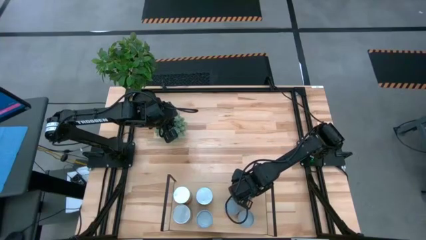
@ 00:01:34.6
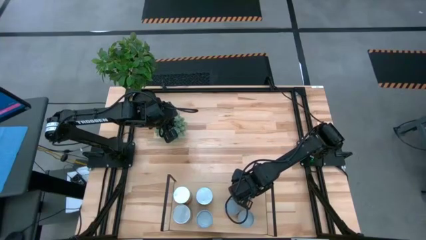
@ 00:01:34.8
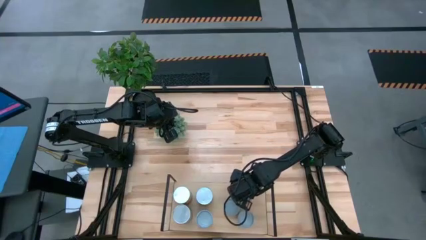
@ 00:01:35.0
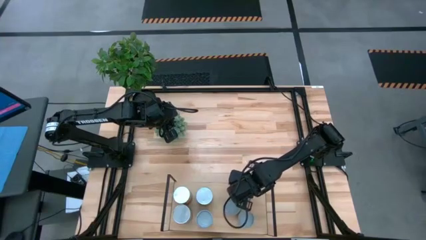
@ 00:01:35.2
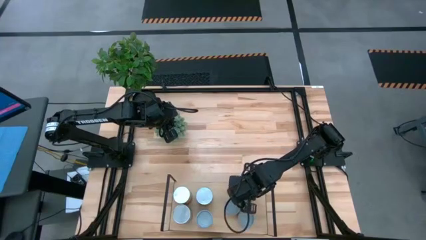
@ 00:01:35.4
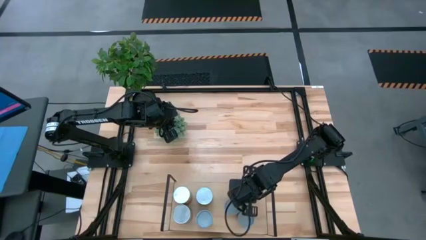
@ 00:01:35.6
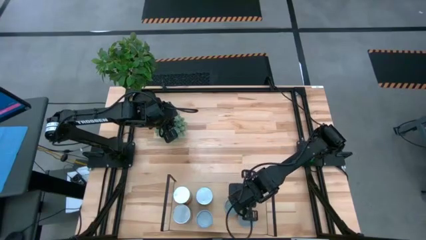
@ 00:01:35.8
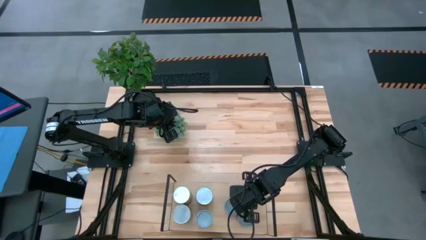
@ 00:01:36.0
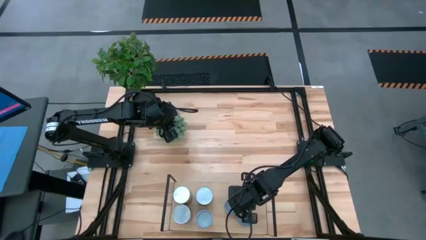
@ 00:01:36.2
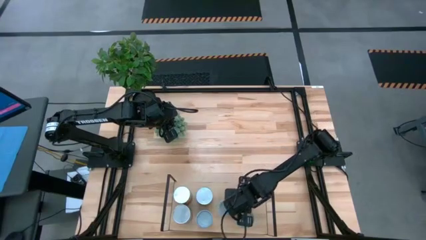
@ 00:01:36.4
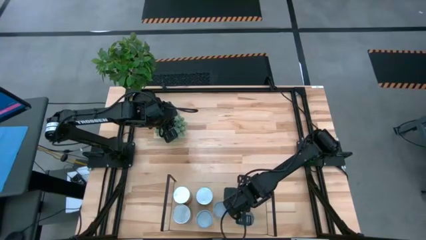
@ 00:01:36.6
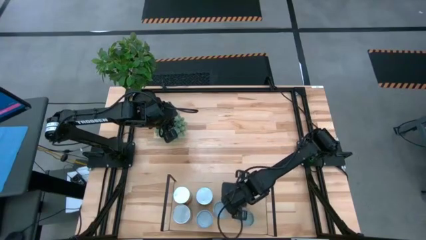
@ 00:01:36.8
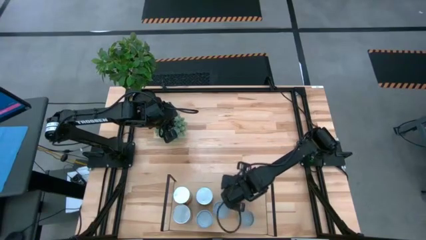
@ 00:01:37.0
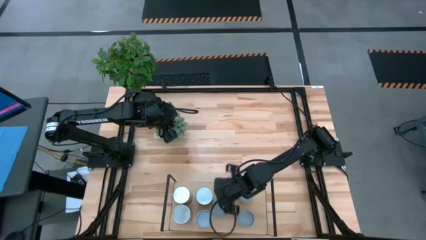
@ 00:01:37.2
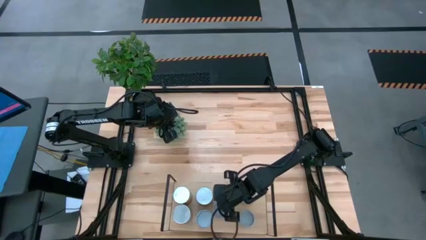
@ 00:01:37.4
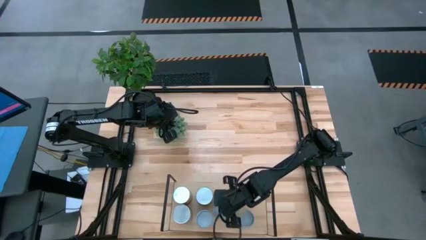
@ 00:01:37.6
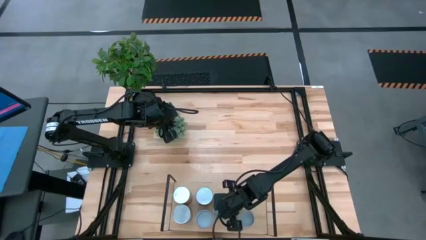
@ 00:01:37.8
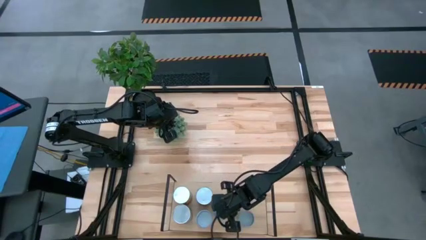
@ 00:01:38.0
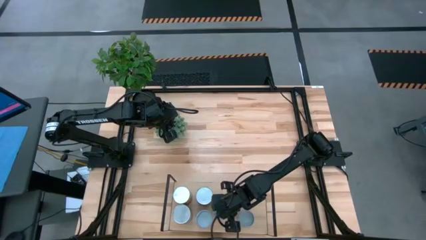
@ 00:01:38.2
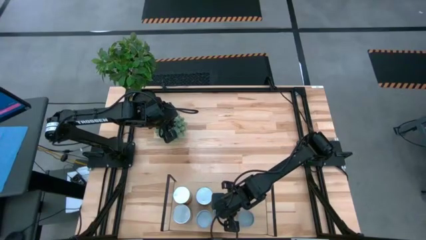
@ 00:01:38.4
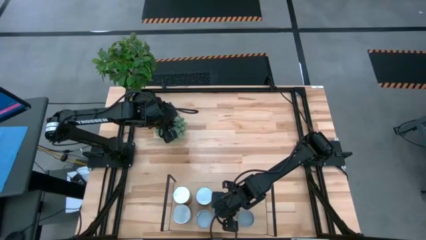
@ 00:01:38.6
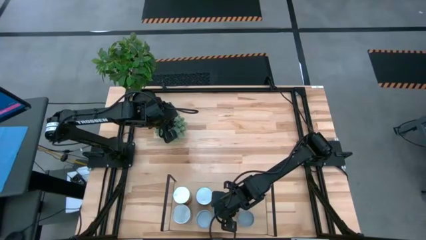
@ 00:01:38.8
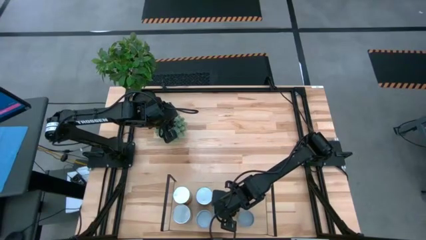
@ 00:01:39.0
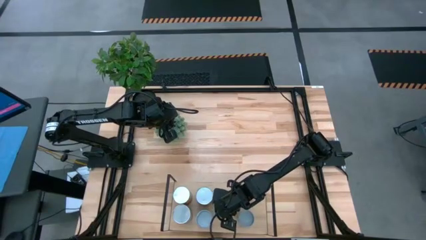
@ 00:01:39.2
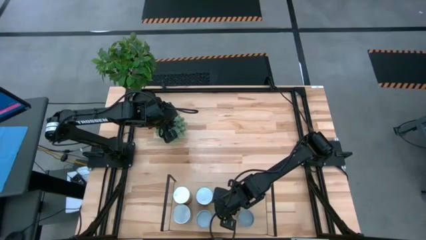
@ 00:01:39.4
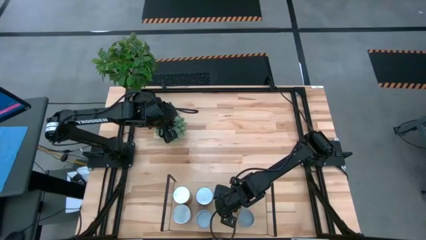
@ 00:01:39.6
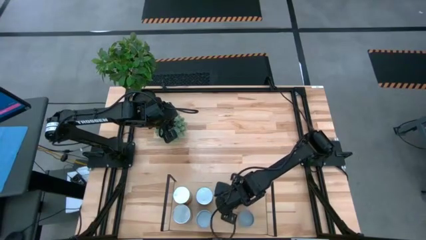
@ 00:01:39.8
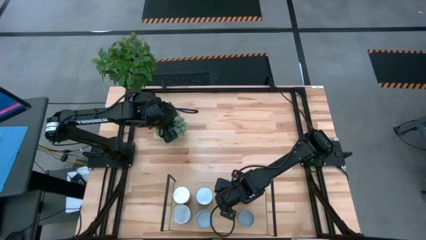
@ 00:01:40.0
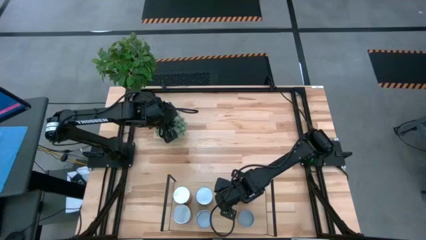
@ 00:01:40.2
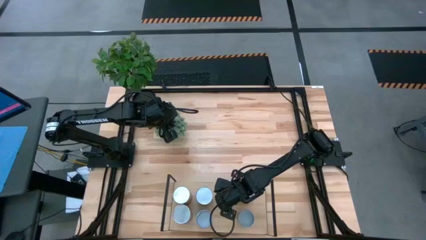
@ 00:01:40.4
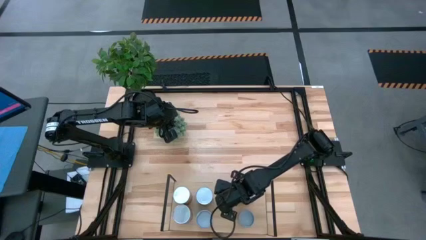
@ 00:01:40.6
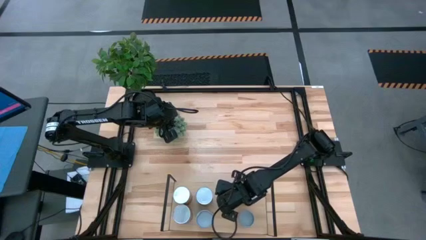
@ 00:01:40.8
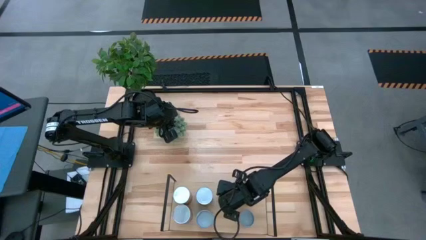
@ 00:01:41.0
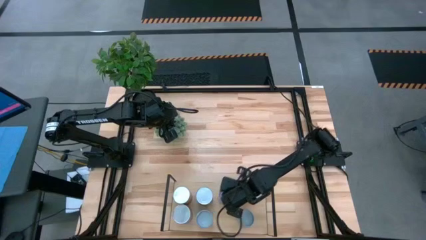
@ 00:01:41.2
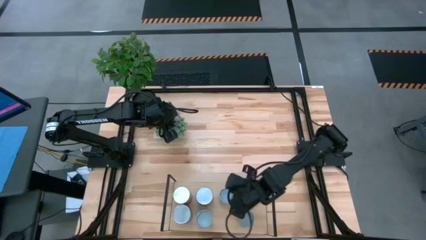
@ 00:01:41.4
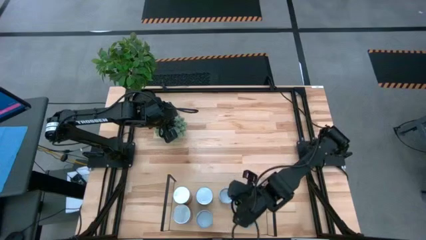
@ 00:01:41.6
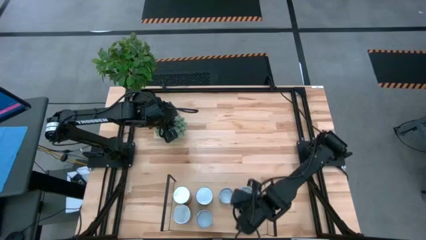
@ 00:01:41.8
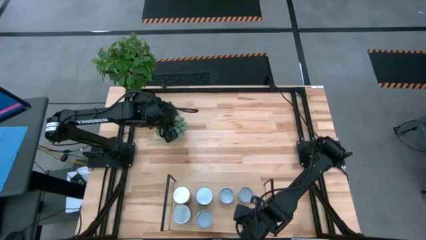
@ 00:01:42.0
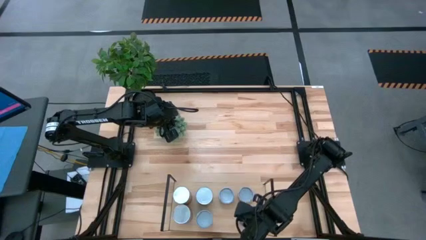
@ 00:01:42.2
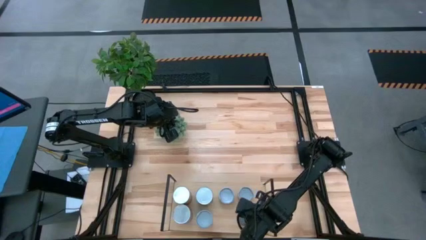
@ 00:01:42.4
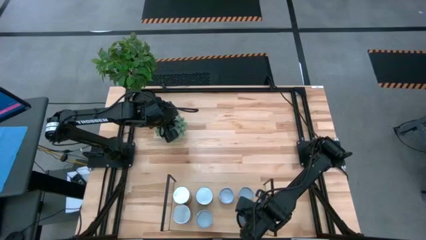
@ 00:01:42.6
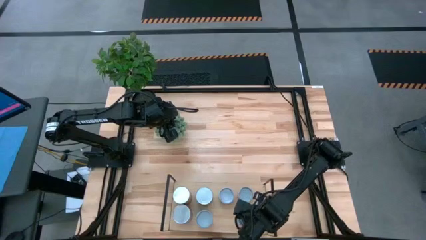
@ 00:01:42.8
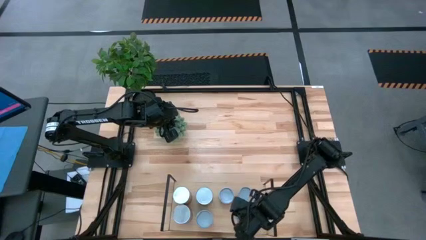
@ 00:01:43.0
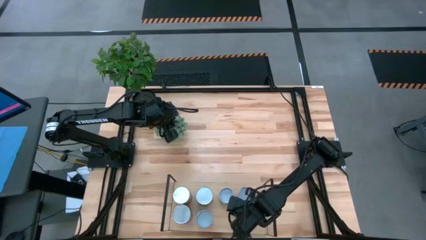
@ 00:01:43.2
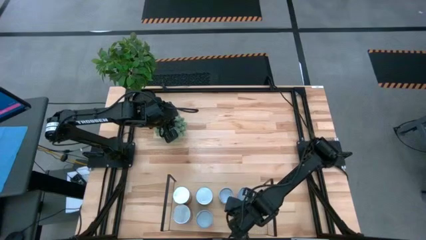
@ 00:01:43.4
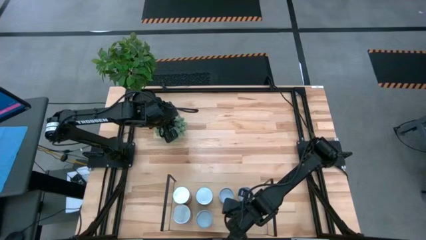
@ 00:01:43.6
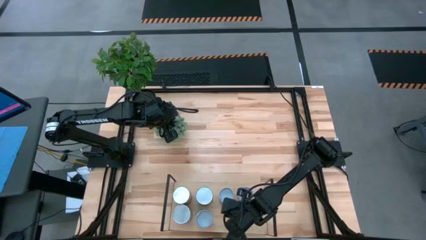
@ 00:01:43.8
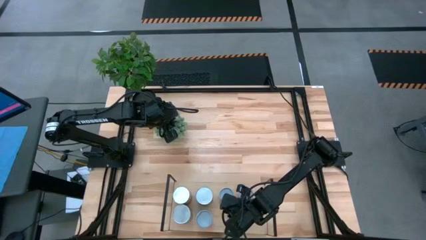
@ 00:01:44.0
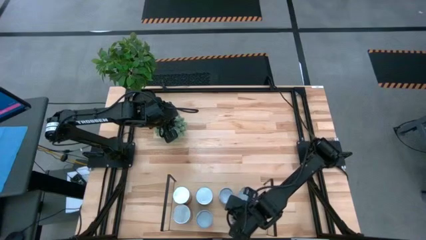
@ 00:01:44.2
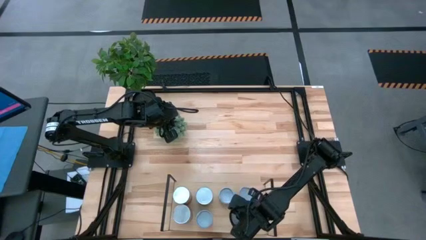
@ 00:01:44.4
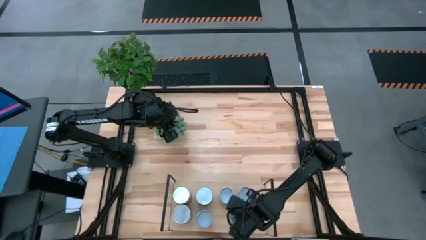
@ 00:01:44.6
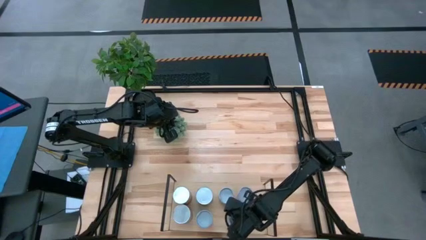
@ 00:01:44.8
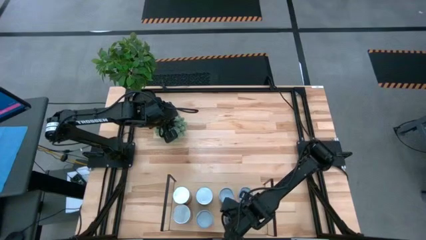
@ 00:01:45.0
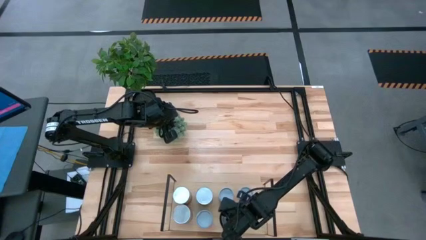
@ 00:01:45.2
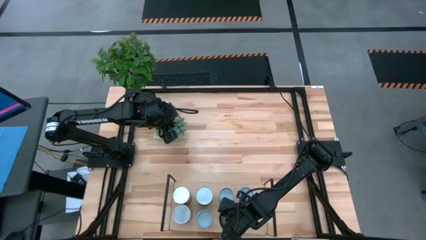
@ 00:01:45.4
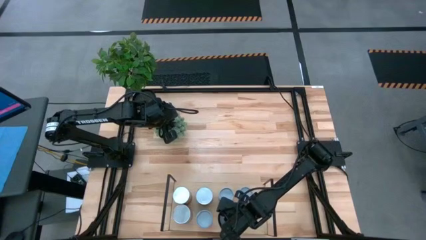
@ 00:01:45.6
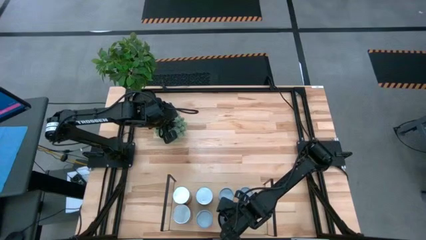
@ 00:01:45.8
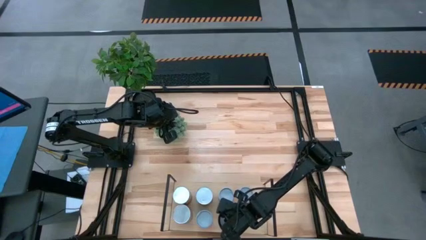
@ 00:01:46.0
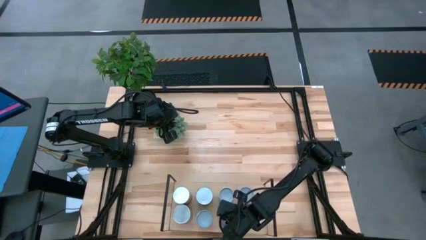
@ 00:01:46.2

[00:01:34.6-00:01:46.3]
Task: Pick and place cans onto a shelf
Adjust the cans on the shelf

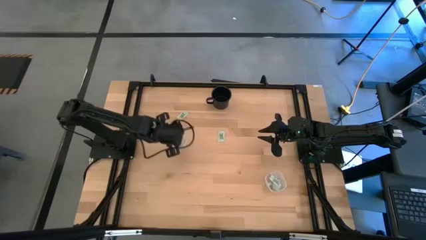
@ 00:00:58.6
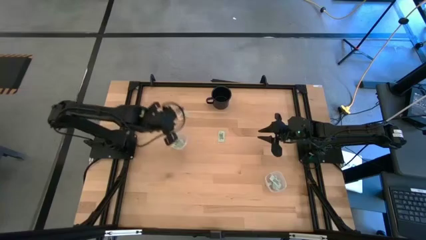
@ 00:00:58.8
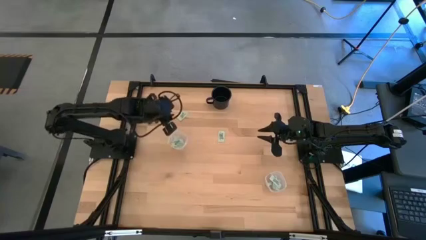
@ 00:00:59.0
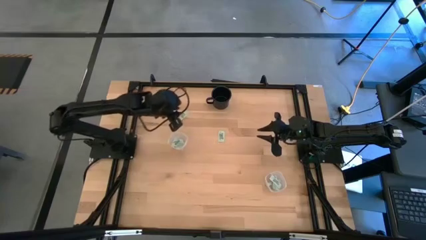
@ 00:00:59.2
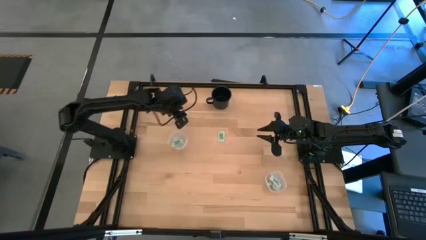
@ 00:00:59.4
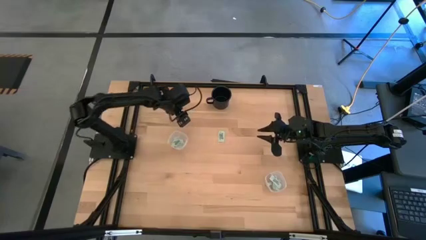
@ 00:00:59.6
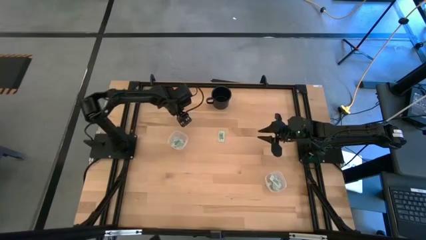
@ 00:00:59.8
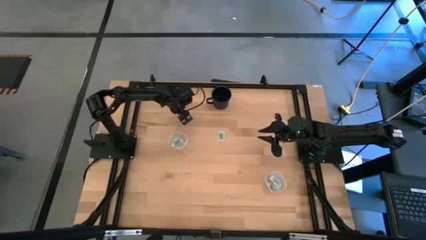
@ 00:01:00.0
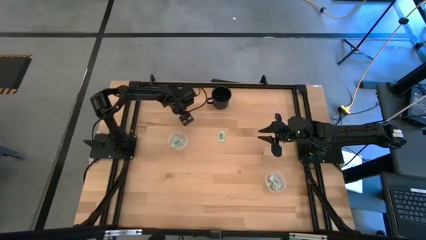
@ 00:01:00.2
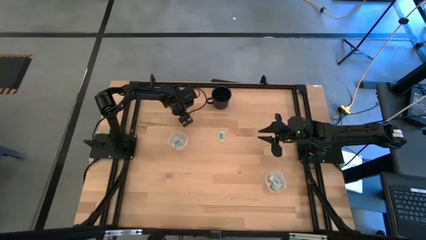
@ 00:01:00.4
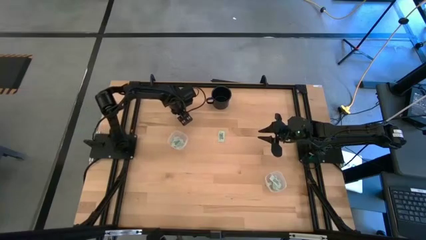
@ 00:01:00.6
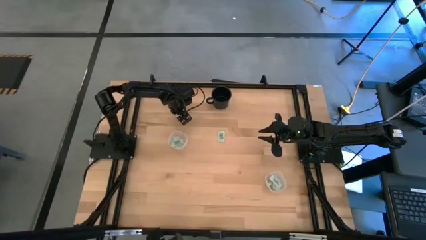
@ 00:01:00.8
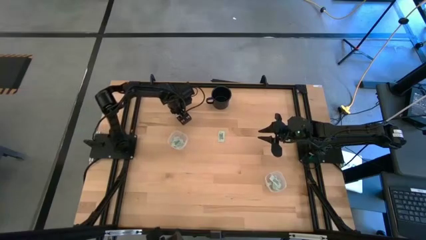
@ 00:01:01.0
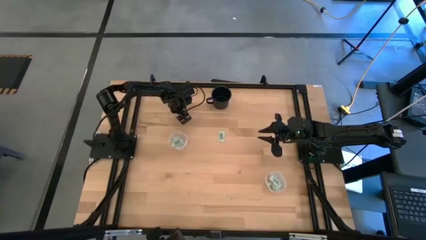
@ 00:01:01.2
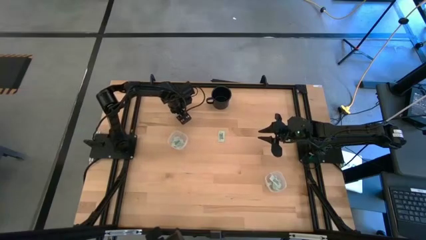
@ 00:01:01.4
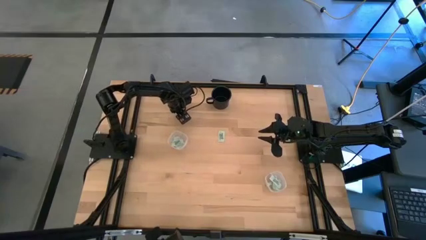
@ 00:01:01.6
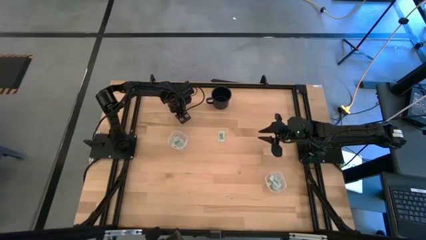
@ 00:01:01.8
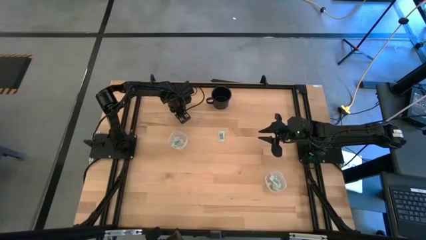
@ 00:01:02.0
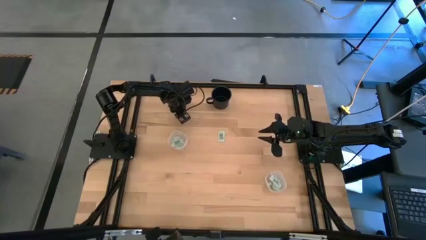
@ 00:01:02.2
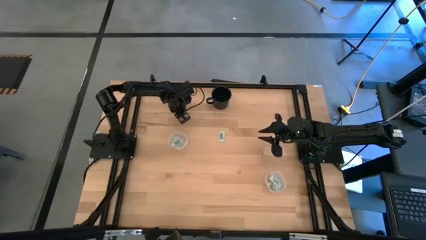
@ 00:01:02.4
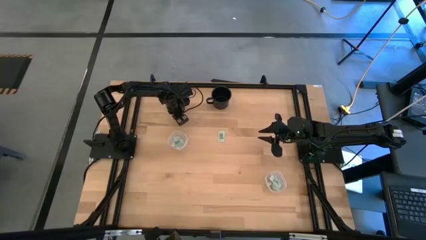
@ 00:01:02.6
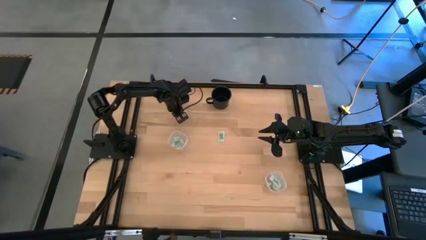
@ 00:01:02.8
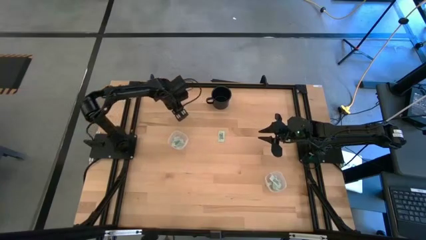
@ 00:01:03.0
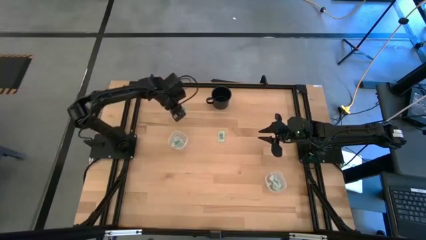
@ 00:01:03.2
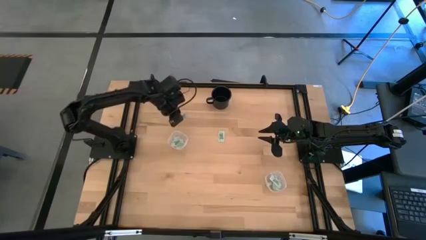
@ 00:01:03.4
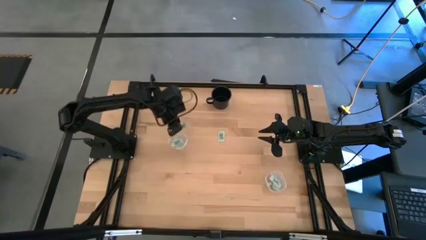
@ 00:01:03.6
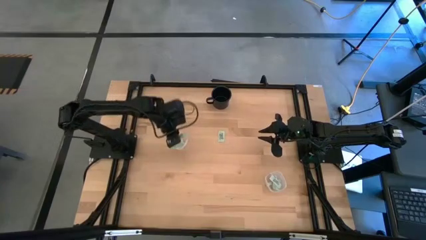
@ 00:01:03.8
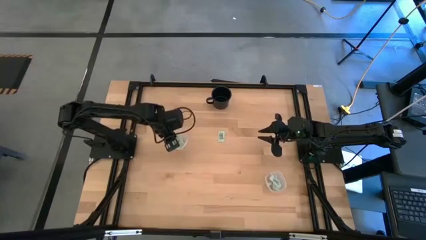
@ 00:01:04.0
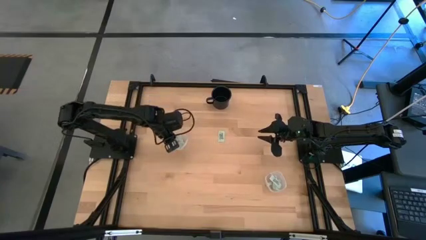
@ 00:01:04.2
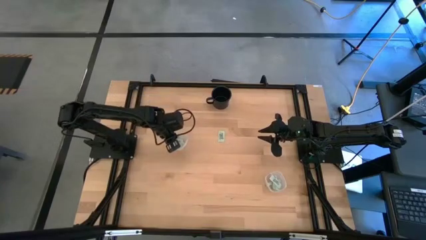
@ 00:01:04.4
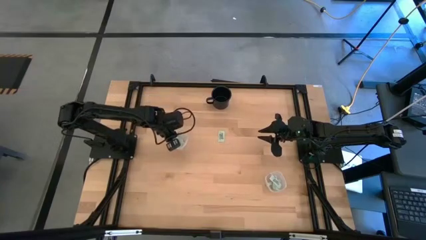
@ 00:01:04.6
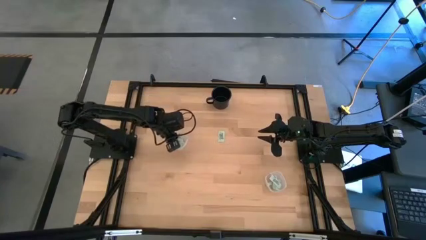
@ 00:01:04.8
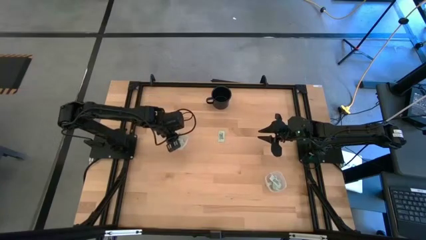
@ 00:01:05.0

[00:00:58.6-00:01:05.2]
Task: Pick and place items into bin
Put the white stevia packet into the top transparent bin
